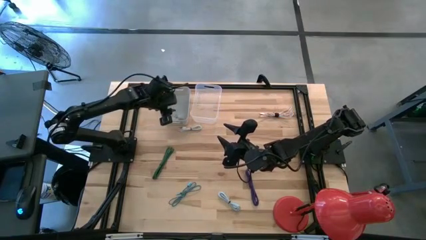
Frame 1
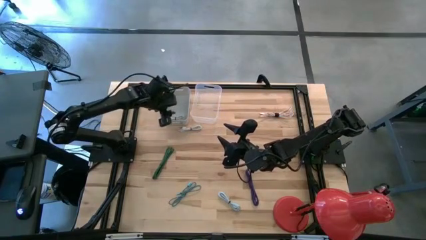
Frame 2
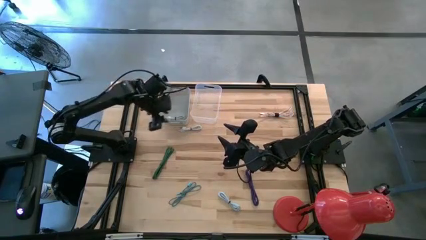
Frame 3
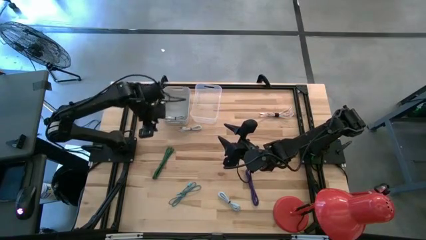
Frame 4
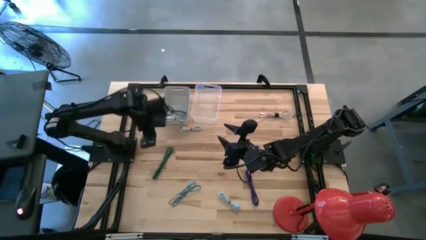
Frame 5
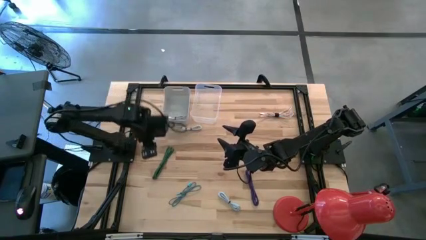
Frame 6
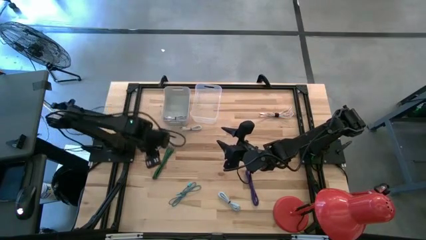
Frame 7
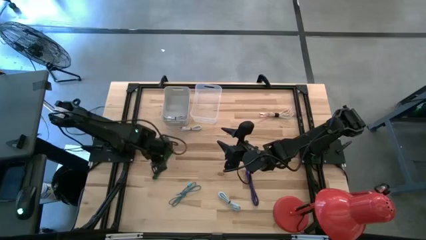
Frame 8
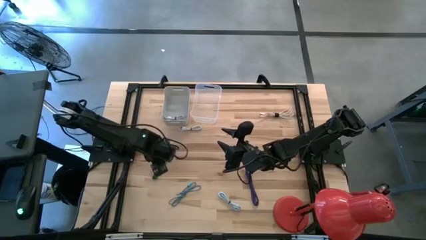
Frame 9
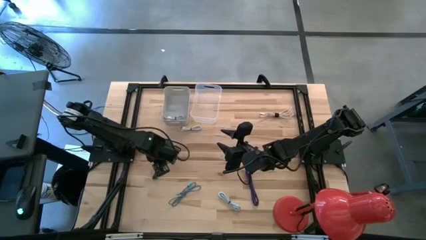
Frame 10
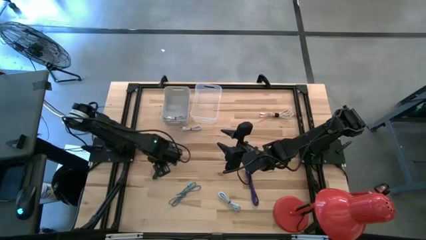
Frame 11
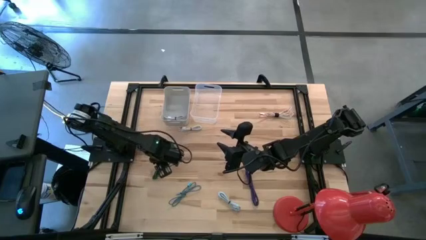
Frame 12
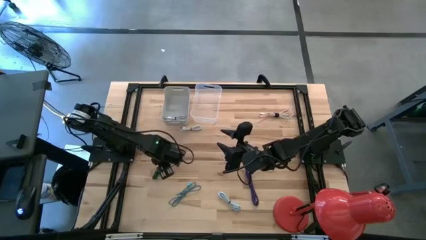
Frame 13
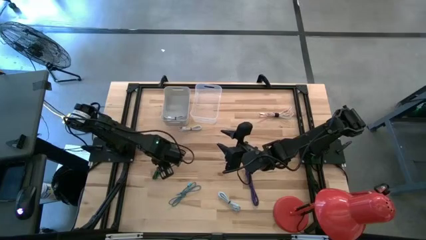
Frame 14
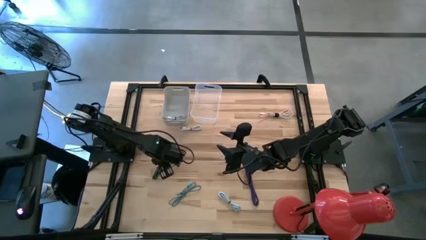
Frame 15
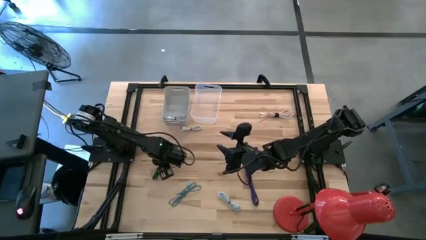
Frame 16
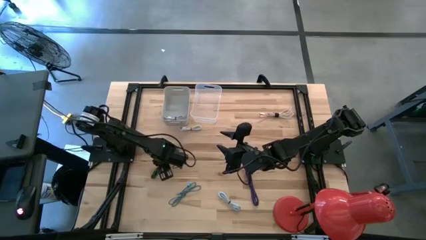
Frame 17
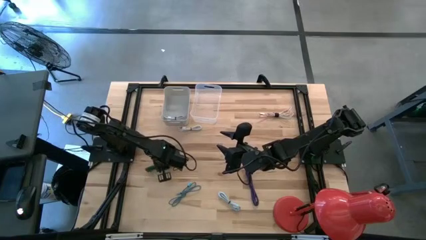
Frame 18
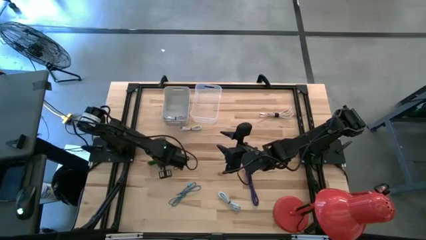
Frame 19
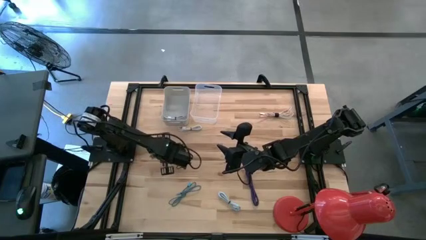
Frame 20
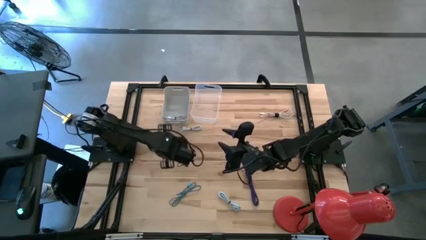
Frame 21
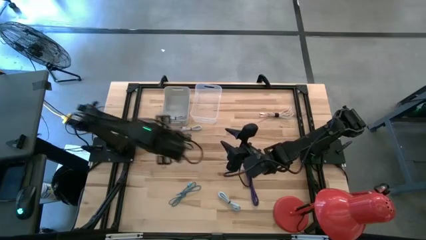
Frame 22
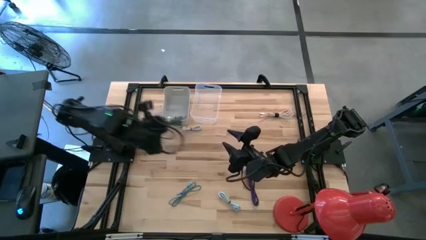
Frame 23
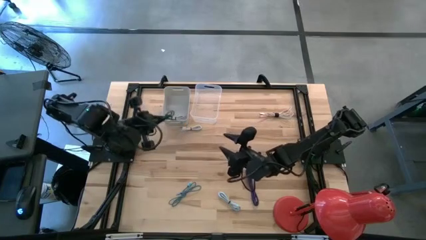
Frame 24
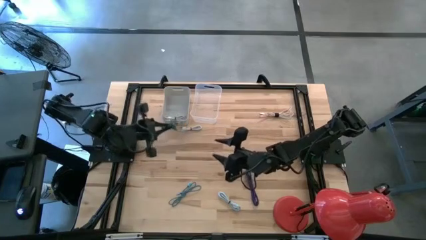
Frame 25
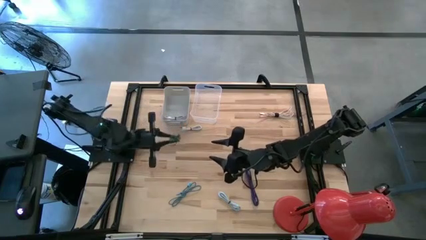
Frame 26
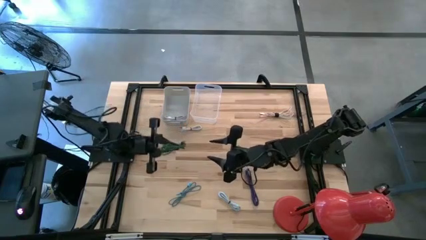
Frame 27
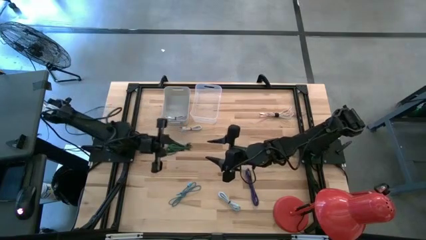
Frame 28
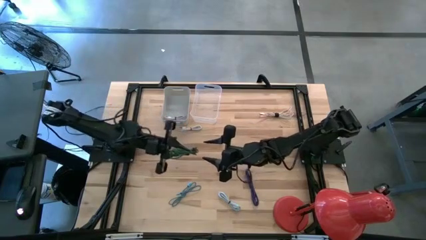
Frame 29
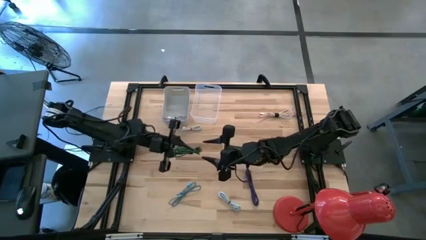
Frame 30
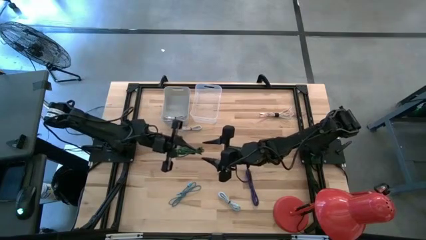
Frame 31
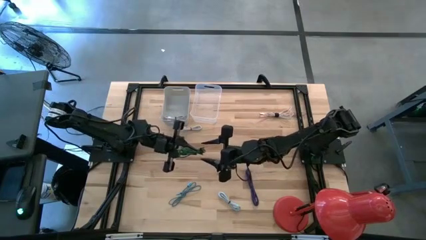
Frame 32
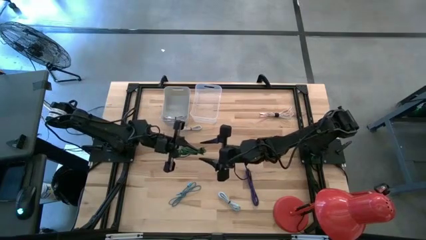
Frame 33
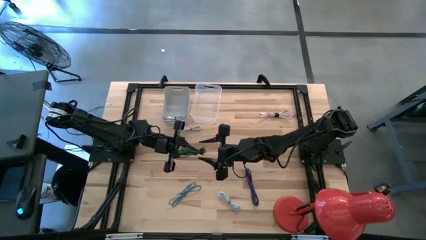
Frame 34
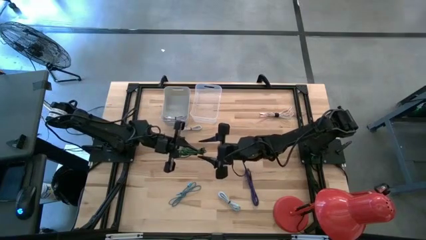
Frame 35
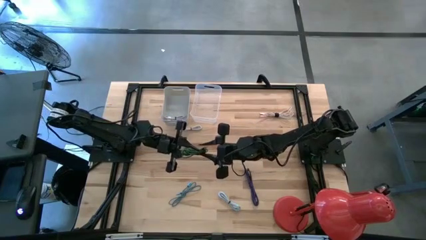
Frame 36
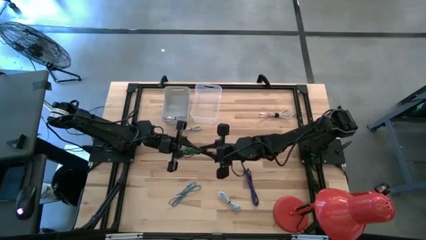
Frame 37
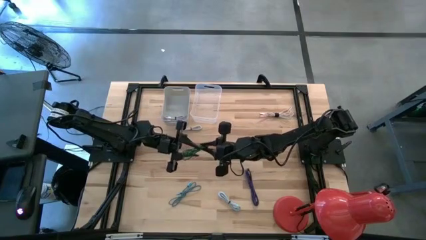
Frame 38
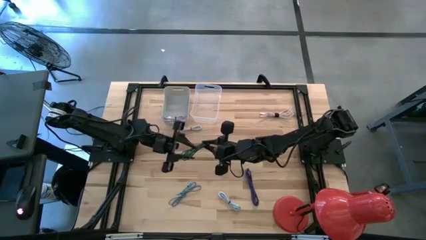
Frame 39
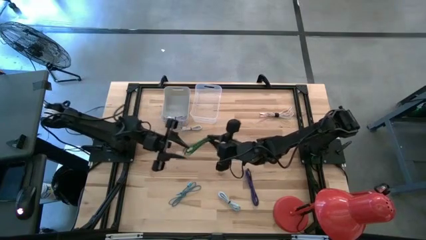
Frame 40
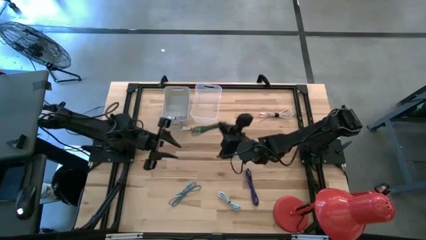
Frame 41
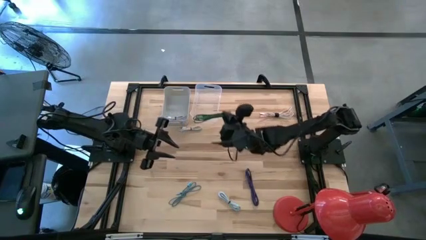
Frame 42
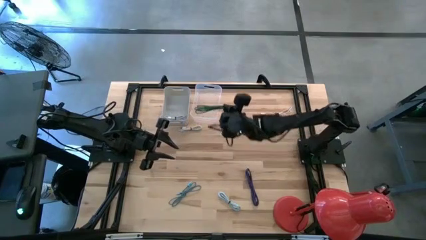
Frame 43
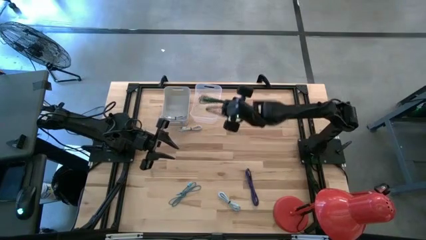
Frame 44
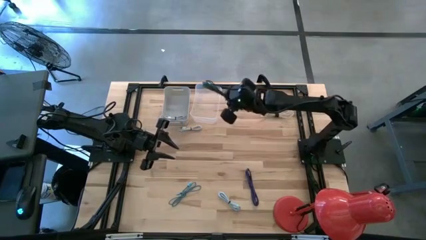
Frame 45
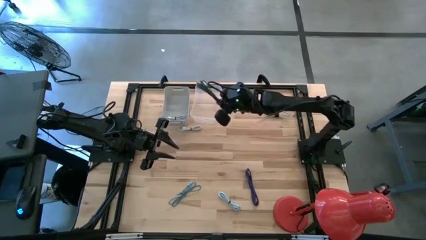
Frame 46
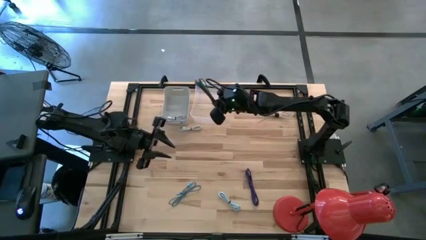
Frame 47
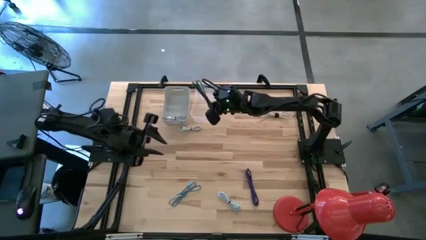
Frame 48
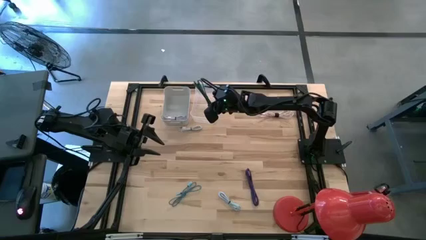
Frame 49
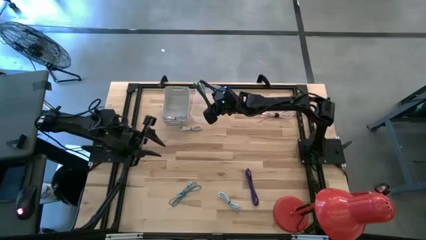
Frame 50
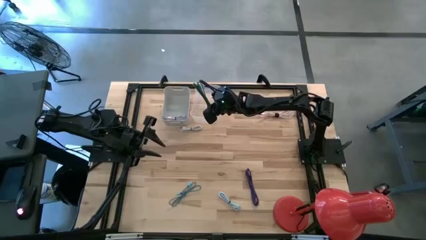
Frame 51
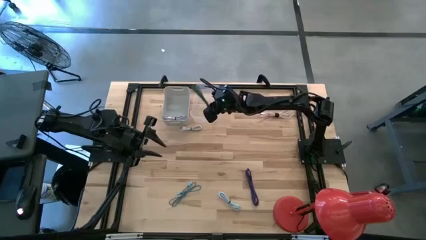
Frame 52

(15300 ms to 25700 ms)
Task: Pick & Place USB Port
Put the striped green charger cable into the transparent bin

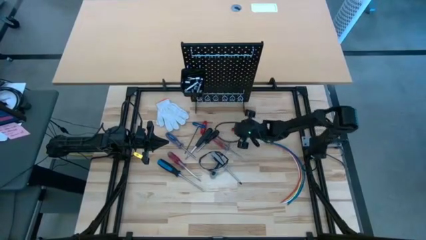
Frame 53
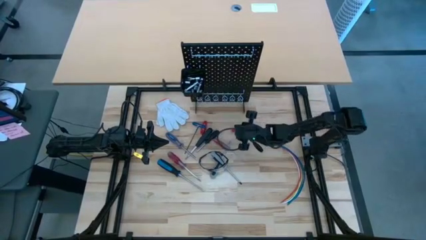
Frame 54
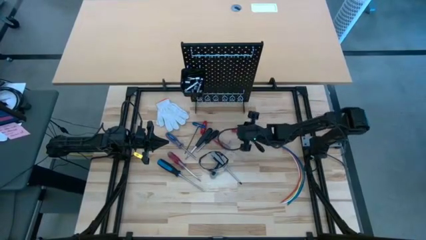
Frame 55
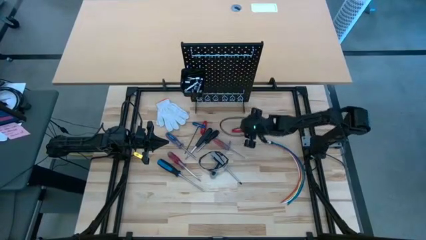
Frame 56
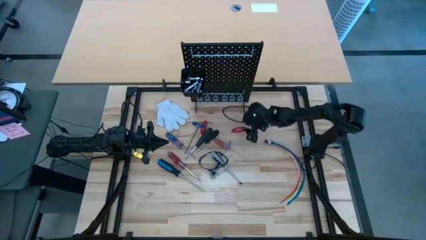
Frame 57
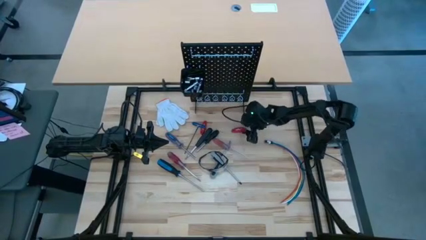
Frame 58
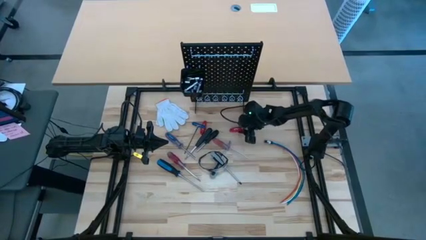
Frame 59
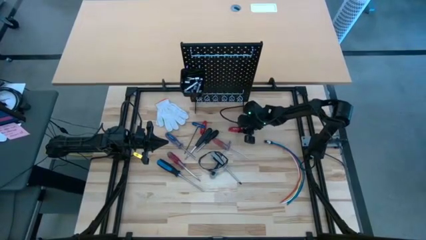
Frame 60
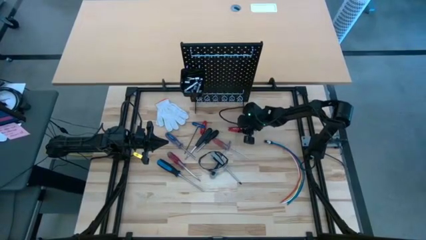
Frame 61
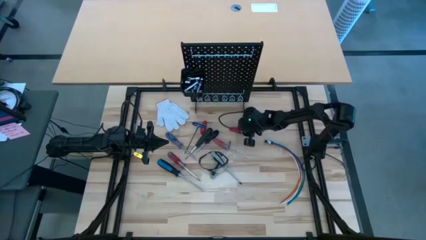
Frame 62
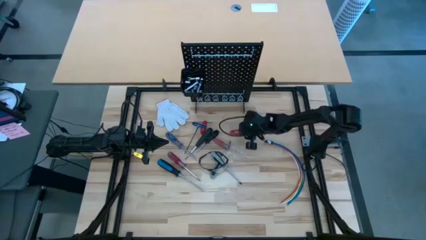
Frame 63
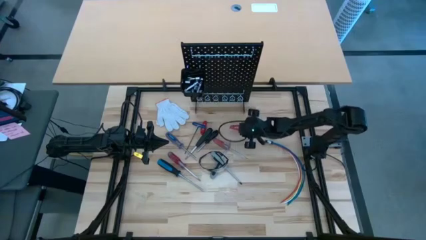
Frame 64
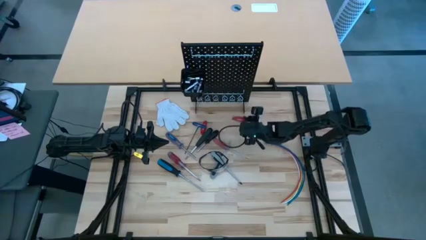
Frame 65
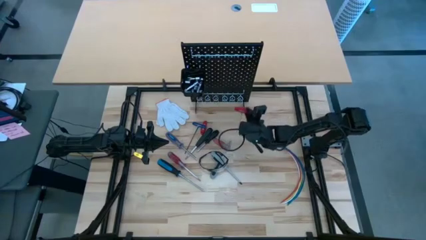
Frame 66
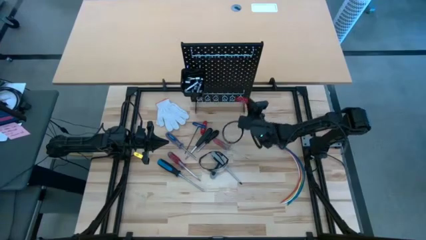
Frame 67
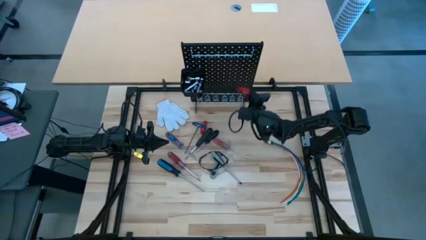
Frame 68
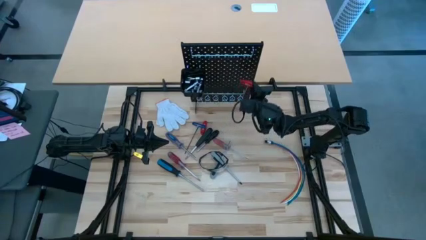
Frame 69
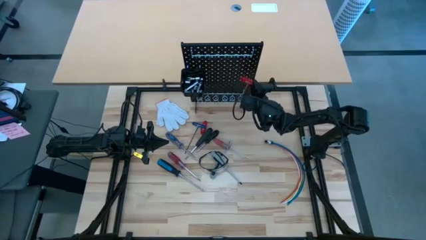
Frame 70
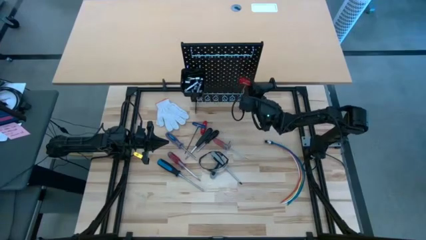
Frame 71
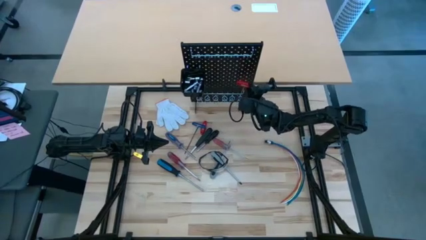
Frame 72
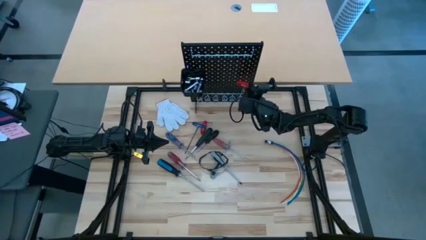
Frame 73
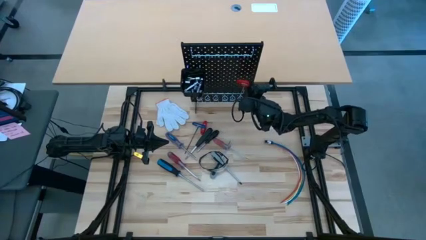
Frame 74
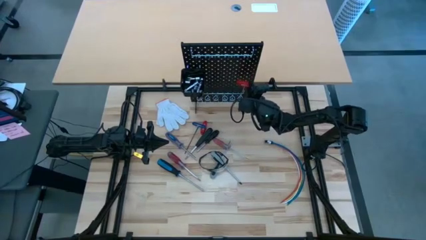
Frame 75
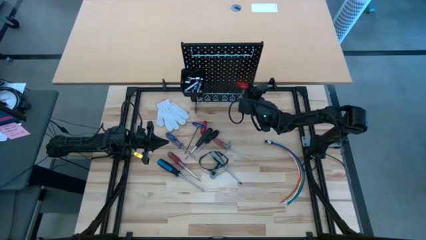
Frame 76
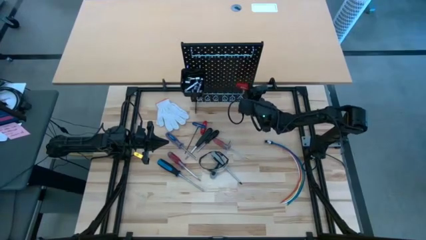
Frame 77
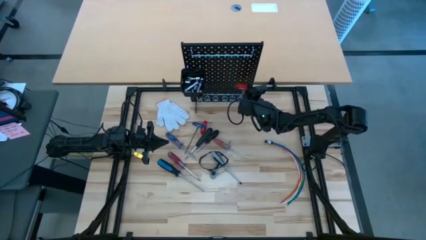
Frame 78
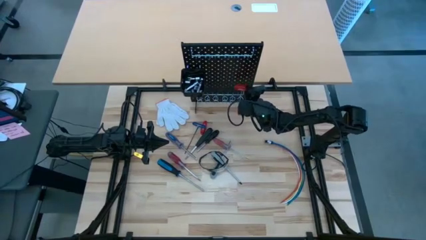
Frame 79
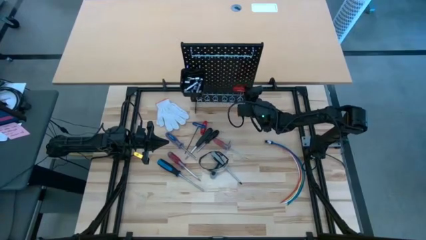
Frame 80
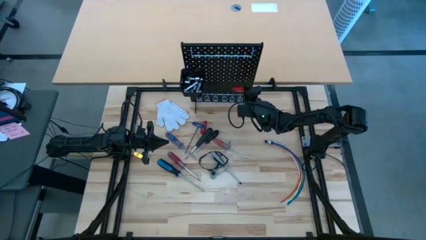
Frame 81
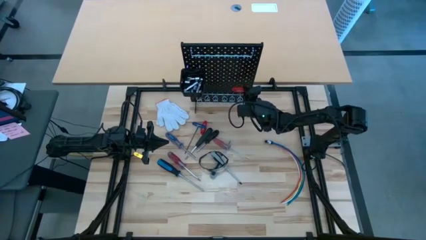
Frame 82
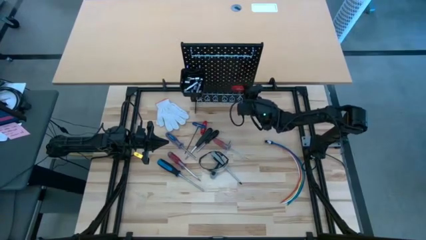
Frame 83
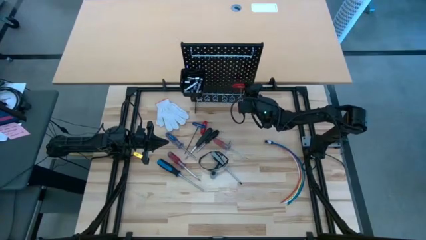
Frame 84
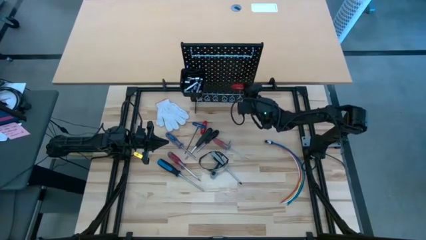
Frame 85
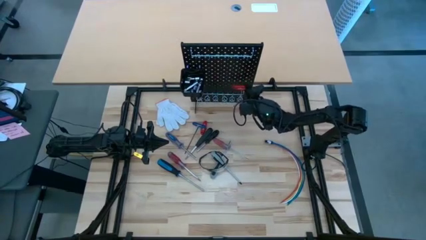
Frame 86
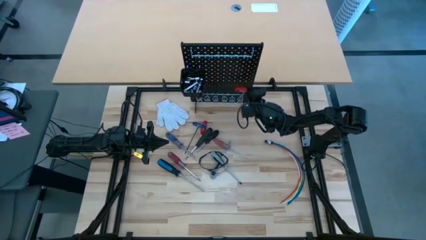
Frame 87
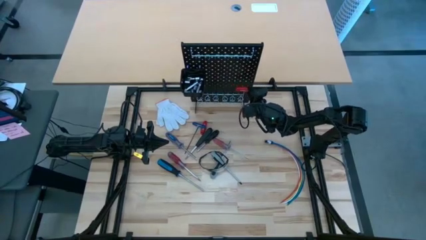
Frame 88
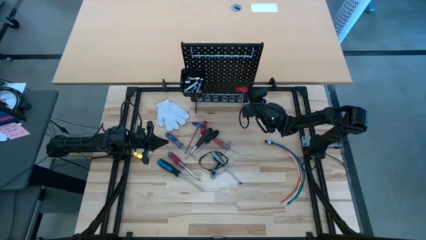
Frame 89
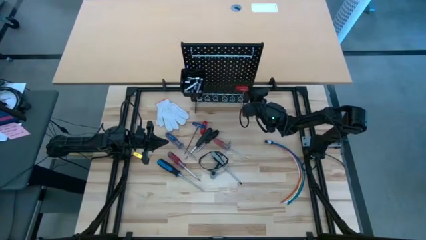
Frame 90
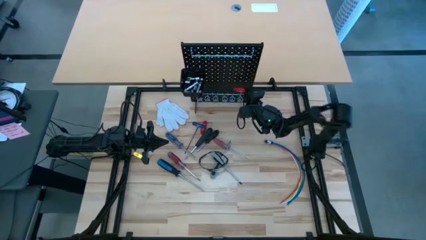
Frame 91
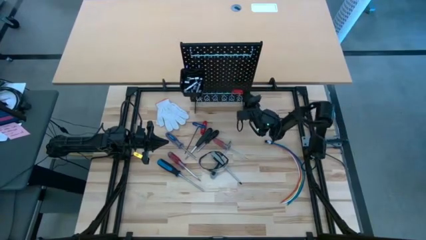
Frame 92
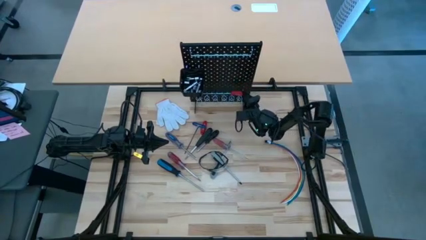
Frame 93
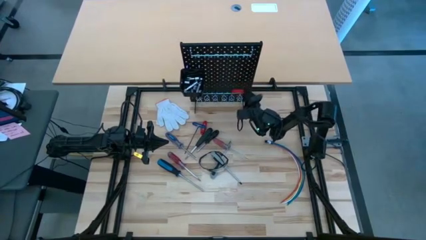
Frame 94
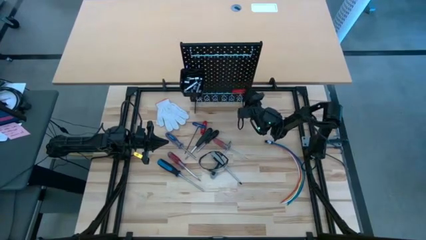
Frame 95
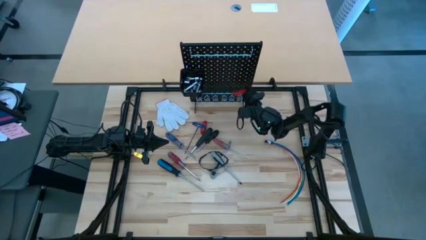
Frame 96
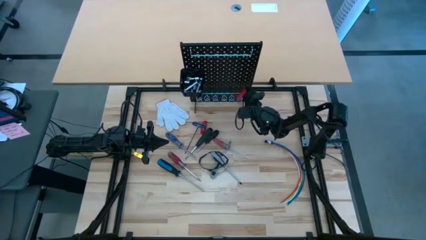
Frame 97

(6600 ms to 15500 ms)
Task: Hang tools onto peg board
Hang the right red allen wrench on the peg board
